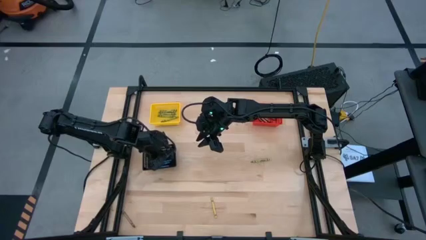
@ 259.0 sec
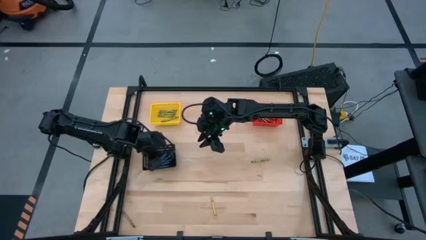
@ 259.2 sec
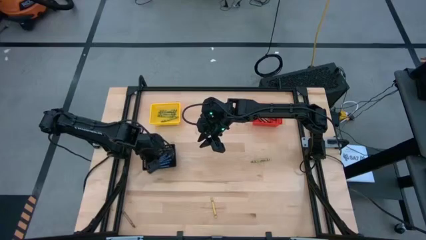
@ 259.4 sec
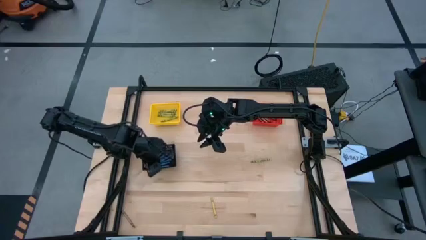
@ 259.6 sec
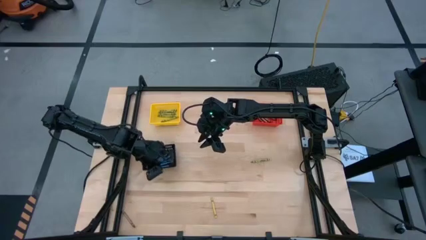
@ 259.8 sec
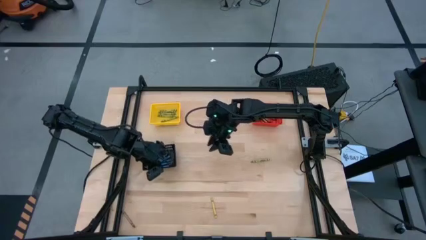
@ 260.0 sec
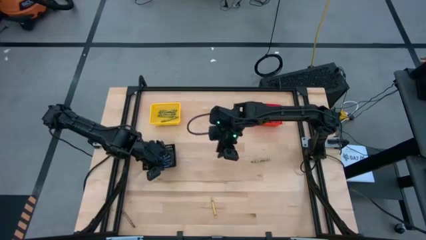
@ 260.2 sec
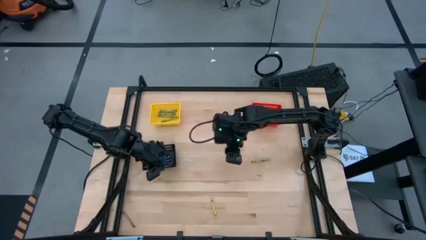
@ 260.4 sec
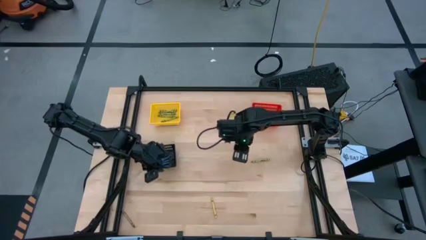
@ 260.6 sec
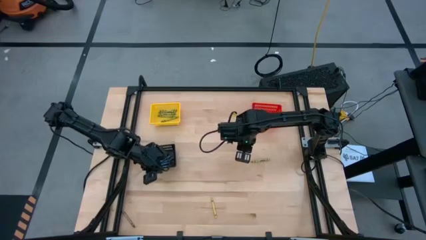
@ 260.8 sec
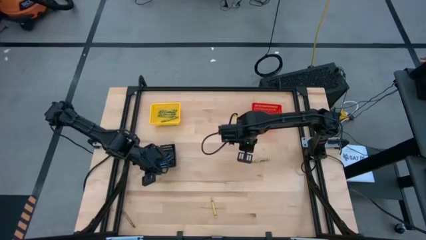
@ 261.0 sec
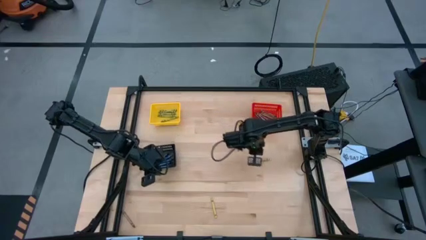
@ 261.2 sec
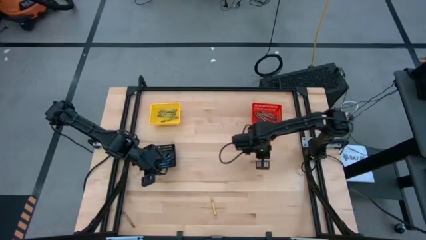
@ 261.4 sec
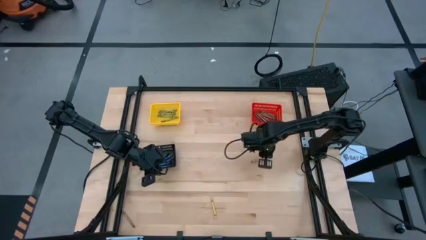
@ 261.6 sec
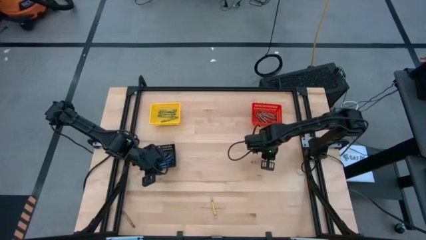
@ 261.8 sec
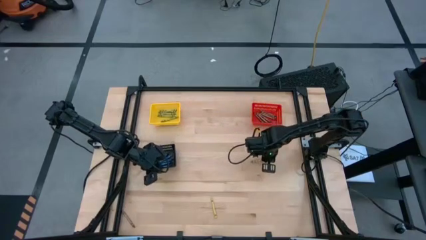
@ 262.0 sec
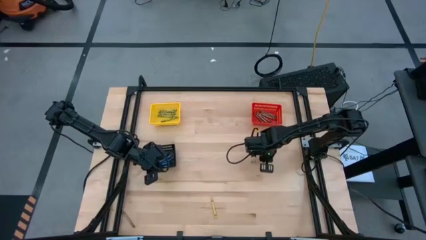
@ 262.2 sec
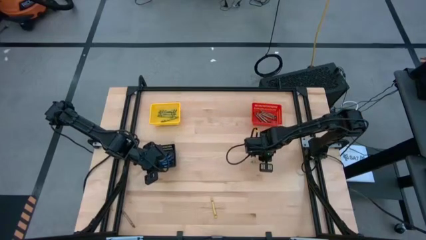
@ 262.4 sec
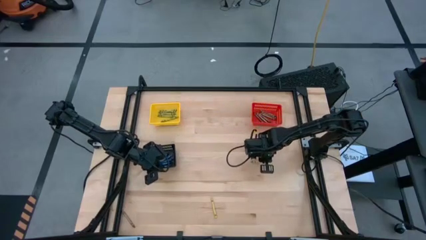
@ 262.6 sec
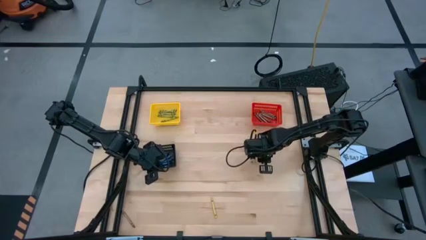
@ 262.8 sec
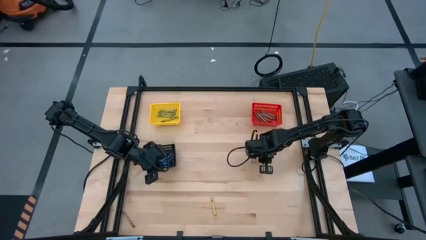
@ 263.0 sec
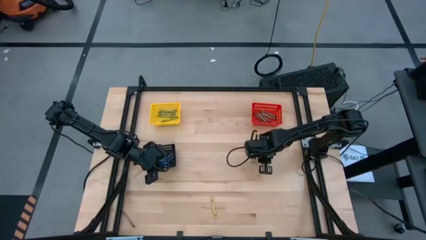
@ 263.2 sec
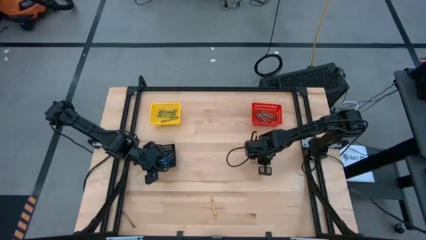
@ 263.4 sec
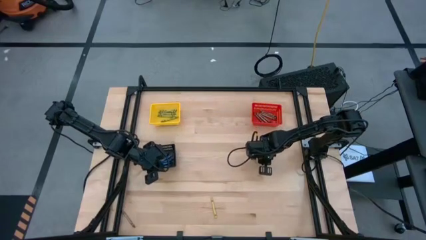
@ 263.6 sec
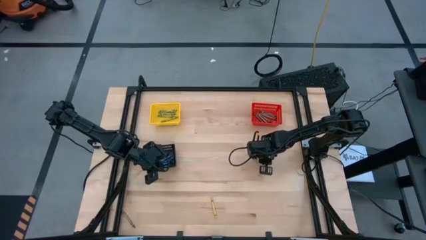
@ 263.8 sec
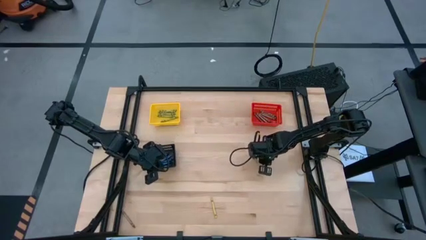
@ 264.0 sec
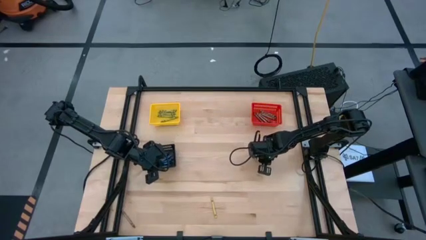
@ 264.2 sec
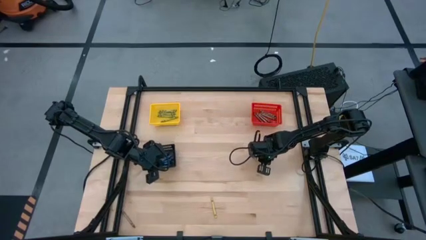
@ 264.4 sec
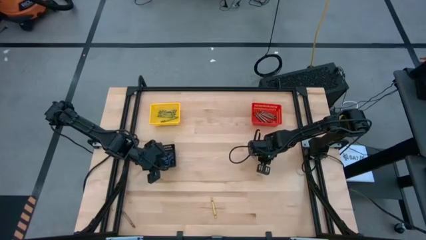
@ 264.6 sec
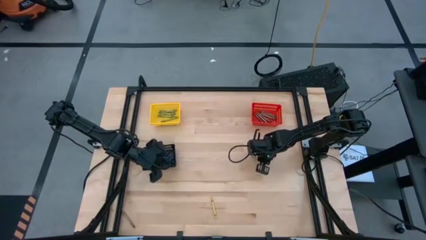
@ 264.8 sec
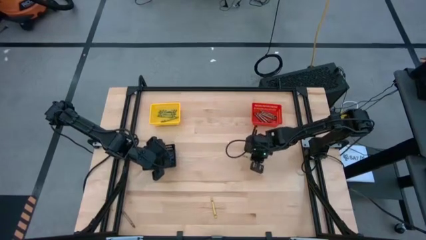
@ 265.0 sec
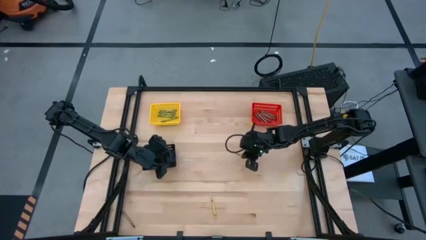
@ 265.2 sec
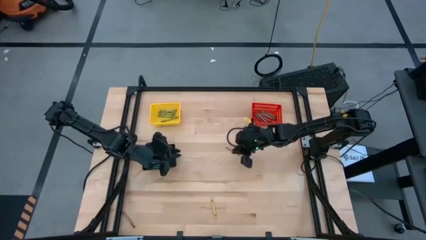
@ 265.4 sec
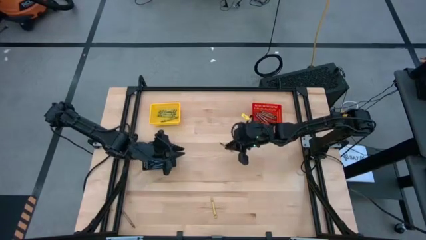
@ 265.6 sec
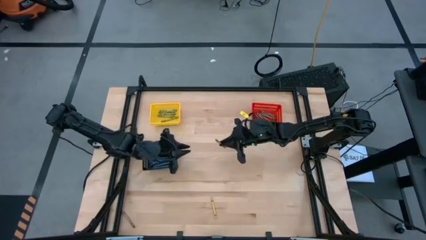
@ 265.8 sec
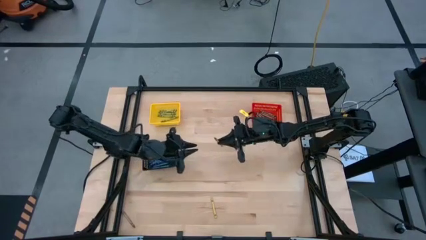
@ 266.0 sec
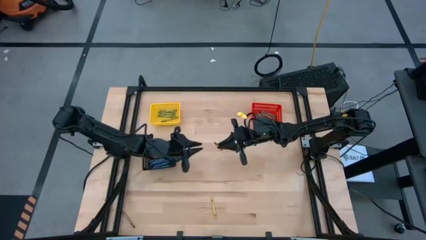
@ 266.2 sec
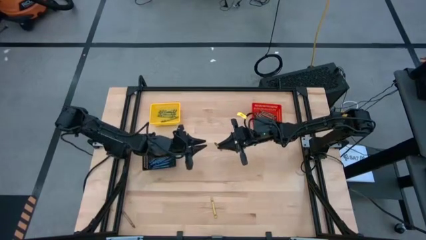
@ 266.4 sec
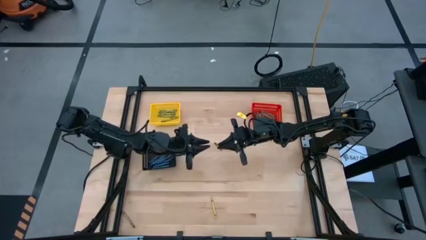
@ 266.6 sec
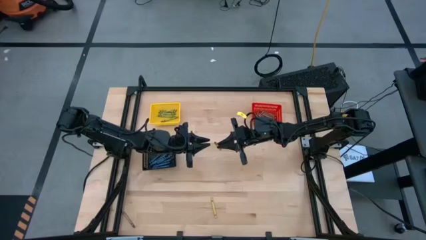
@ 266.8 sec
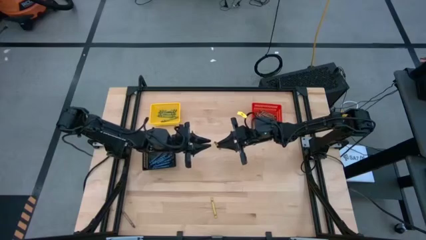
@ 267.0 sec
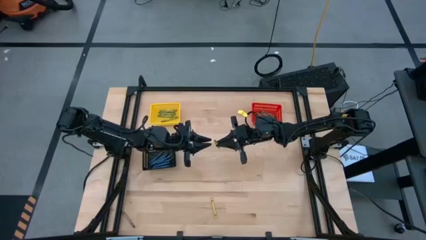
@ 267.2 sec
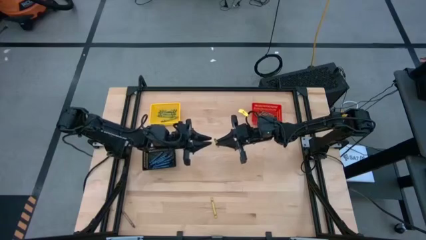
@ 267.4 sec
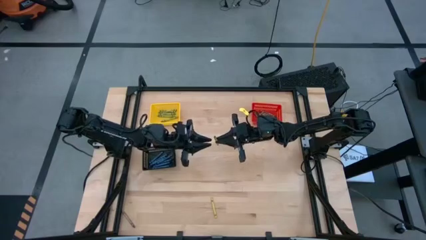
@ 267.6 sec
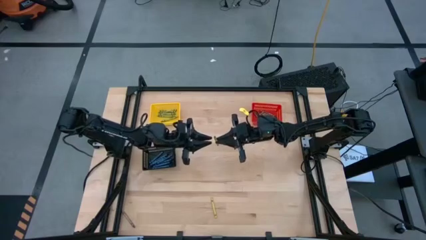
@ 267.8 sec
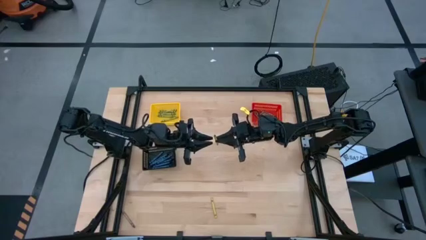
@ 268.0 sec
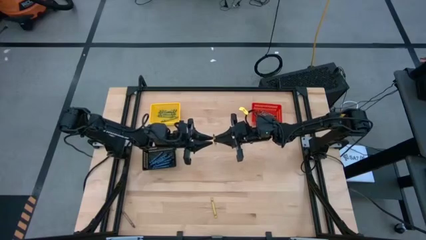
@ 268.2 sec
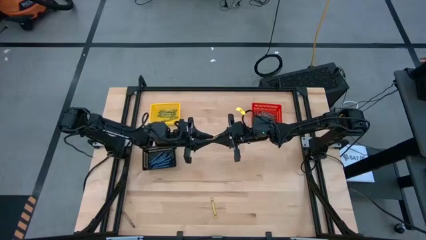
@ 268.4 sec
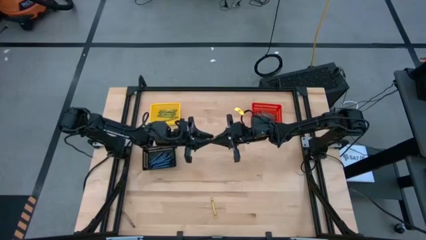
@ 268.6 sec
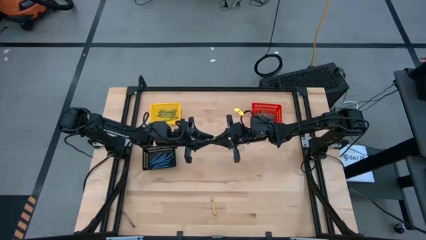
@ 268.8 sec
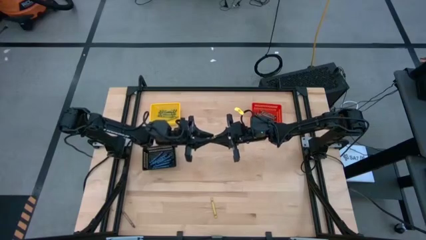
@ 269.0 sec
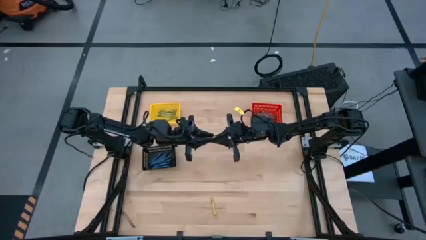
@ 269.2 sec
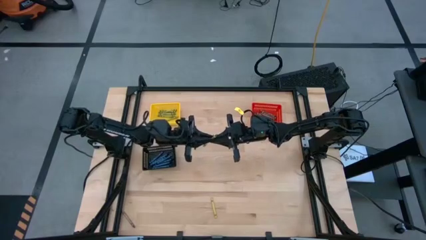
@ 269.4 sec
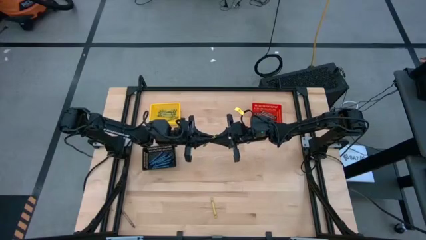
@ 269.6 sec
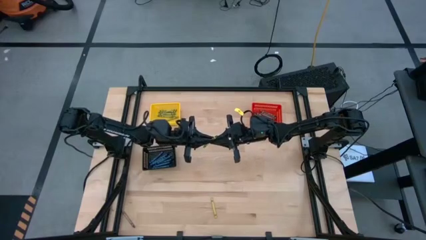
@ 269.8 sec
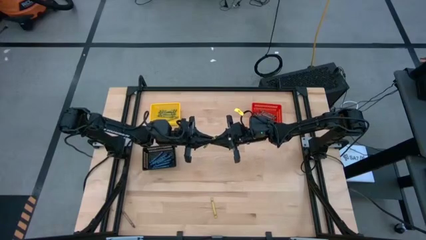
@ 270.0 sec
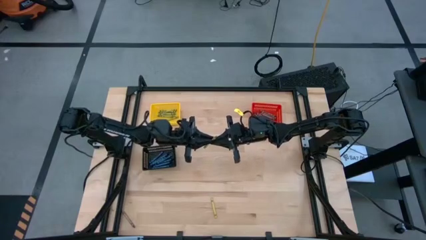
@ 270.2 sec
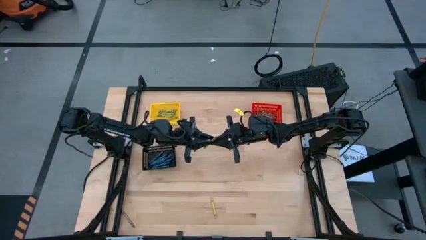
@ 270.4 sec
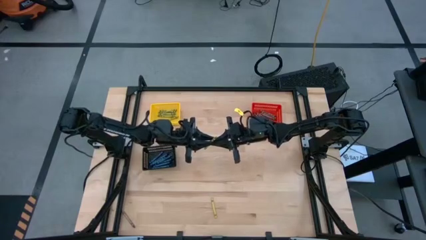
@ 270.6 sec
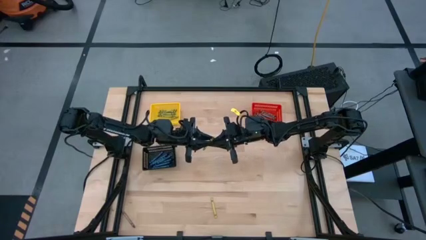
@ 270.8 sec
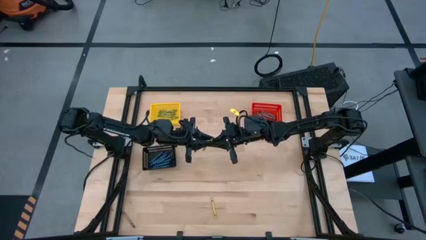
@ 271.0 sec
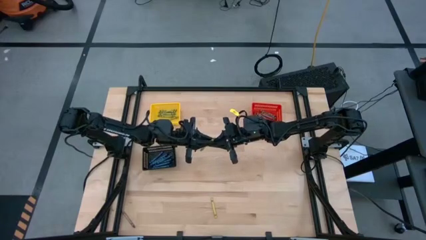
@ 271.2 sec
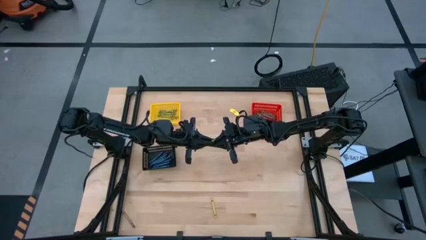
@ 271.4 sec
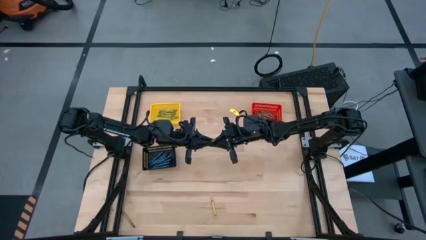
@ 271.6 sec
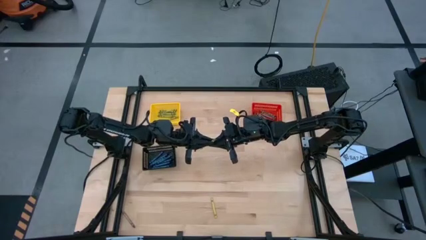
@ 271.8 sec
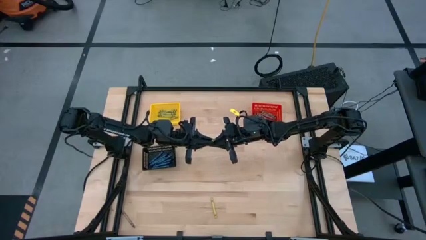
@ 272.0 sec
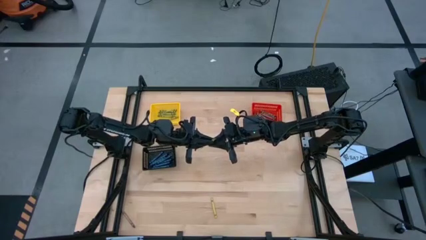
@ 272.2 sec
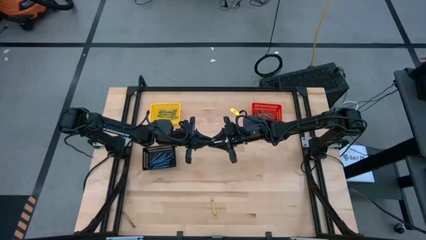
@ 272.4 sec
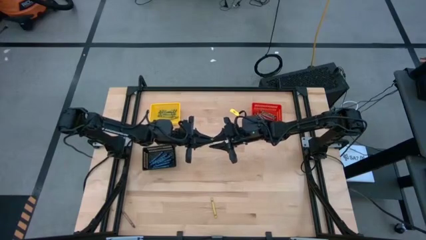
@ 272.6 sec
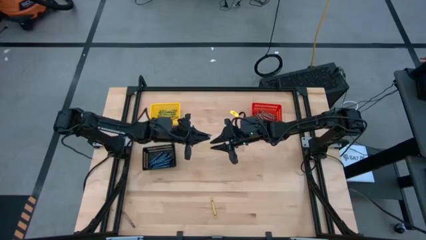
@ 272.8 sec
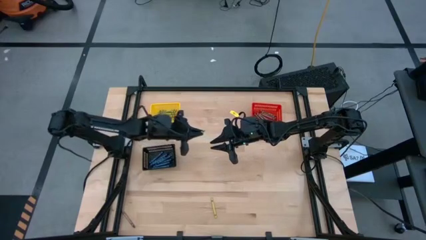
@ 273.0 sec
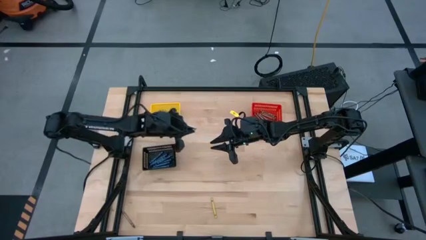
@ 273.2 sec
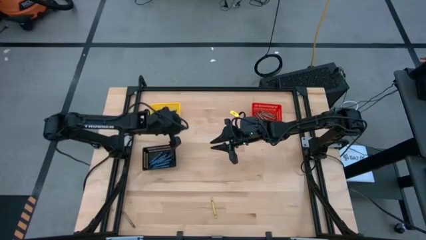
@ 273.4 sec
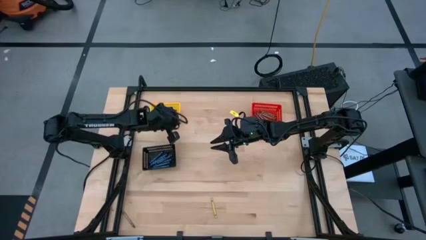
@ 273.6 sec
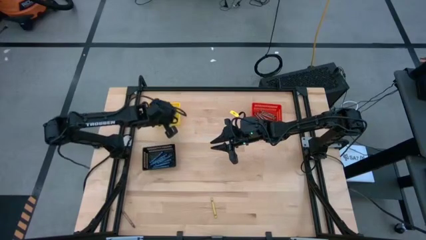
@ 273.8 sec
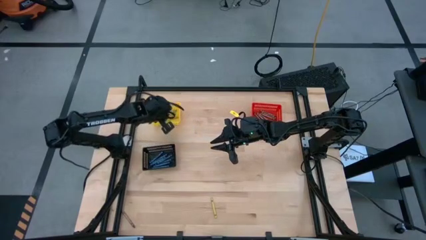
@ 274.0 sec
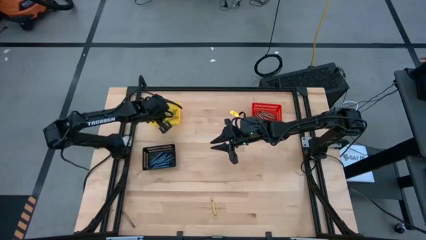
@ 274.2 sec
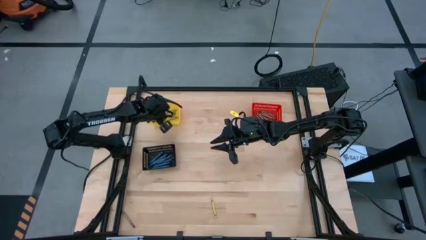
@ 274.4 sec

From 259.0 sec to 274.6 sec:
Task: Sort crayons
Put the green crayon into the yellow bin
